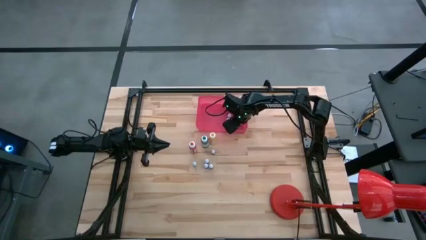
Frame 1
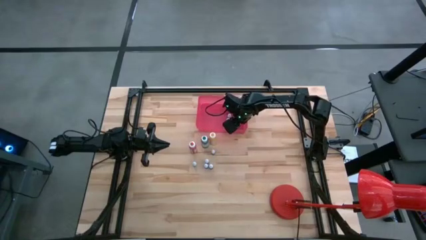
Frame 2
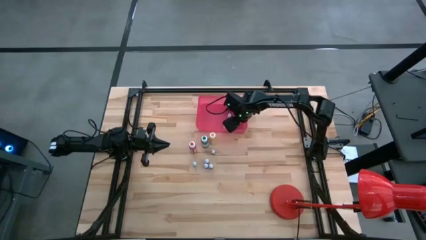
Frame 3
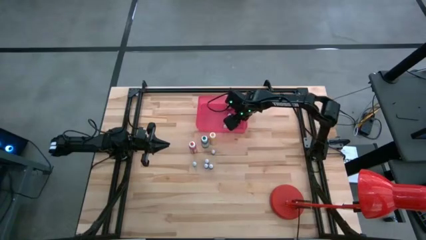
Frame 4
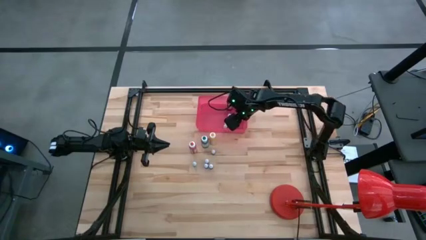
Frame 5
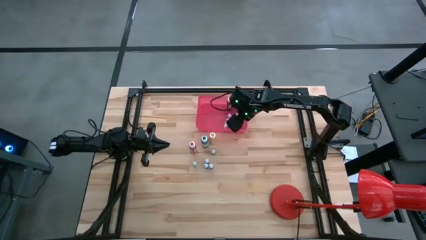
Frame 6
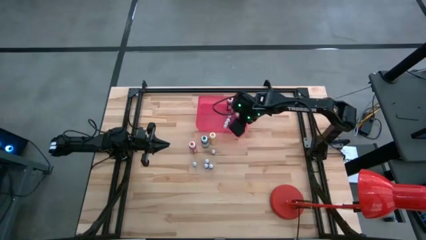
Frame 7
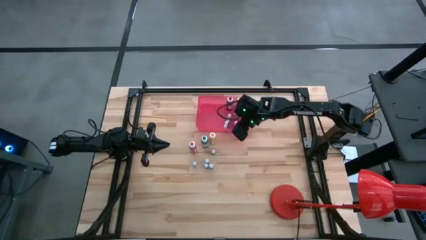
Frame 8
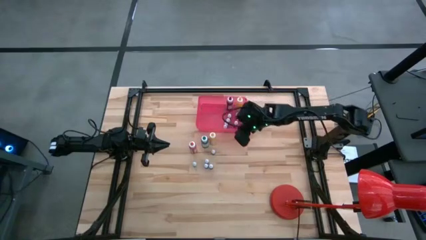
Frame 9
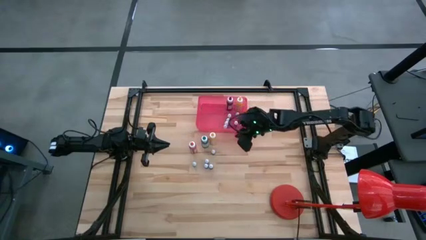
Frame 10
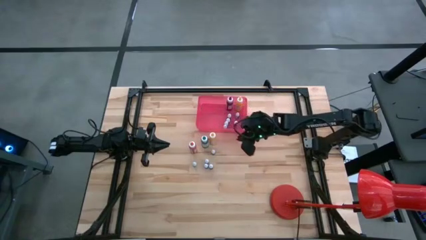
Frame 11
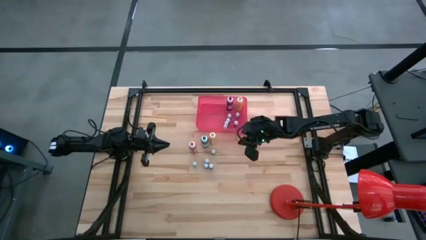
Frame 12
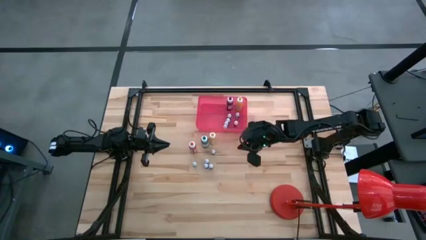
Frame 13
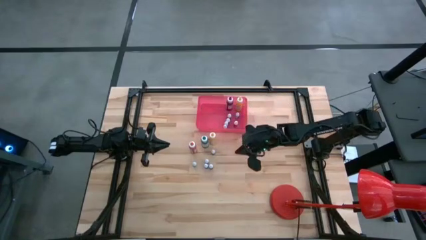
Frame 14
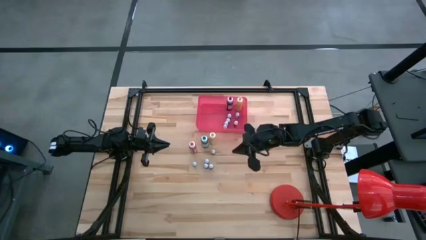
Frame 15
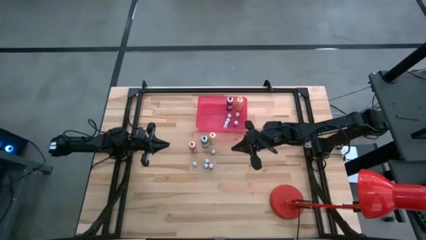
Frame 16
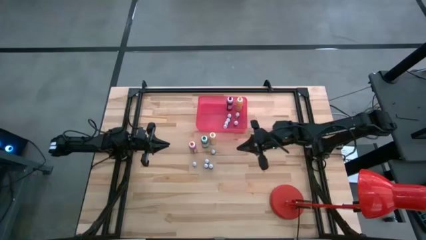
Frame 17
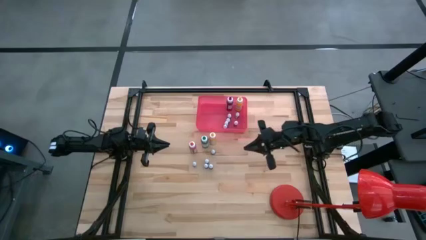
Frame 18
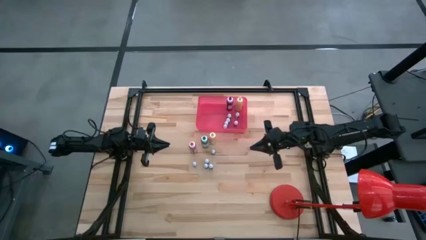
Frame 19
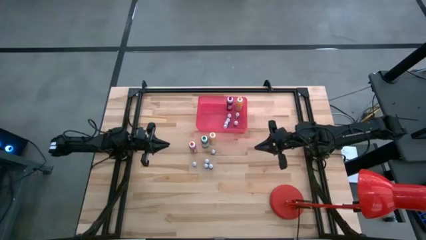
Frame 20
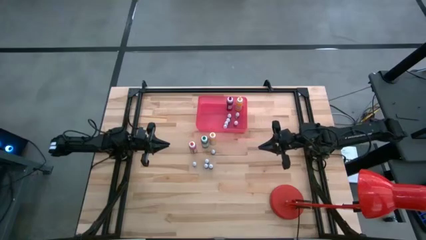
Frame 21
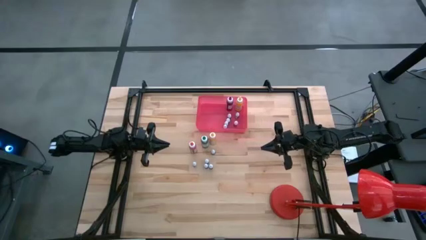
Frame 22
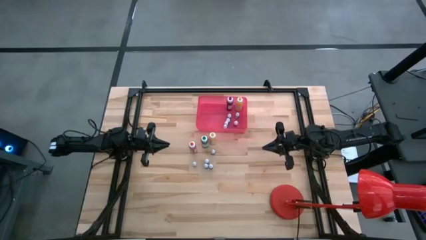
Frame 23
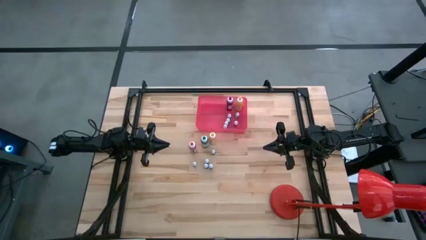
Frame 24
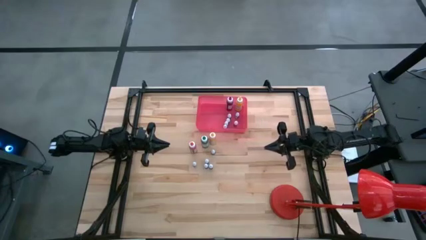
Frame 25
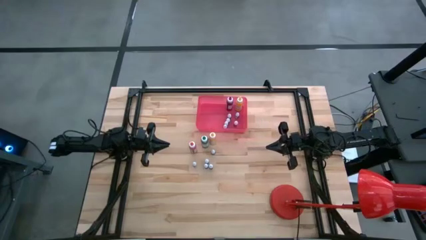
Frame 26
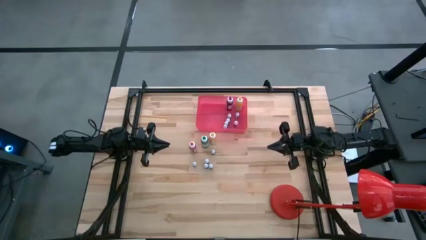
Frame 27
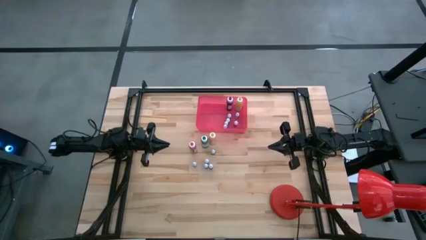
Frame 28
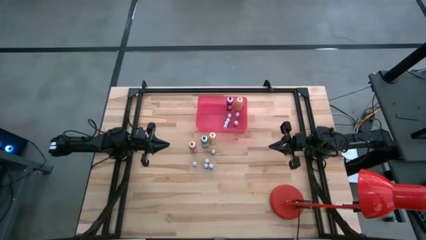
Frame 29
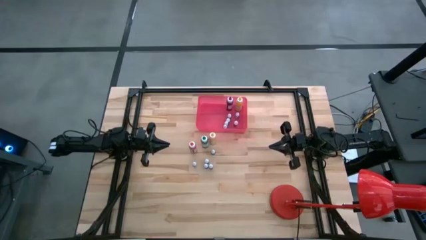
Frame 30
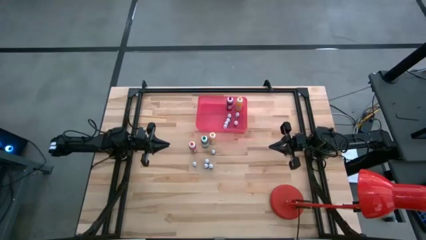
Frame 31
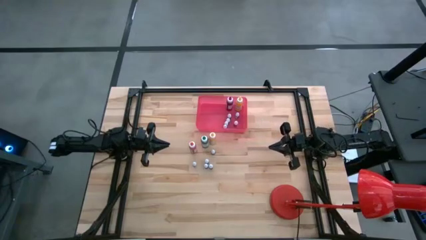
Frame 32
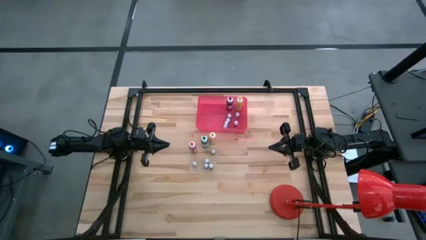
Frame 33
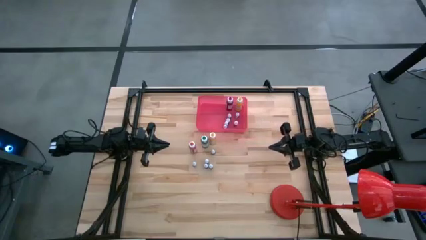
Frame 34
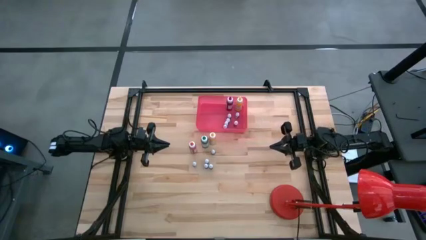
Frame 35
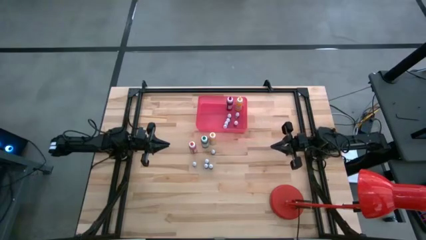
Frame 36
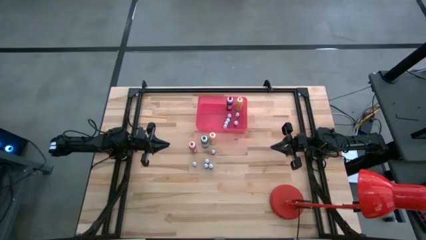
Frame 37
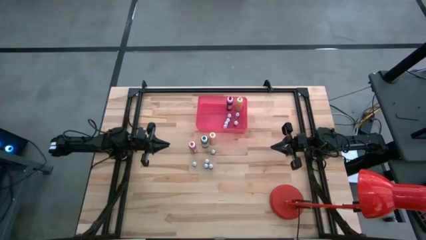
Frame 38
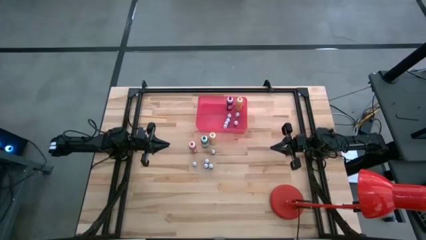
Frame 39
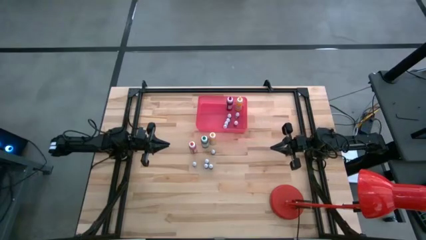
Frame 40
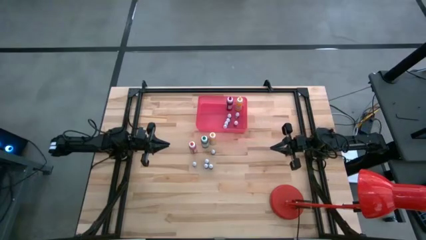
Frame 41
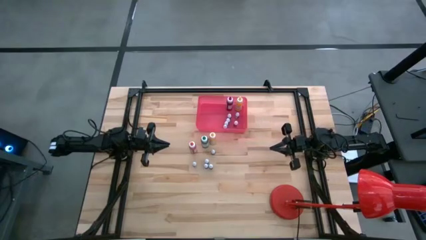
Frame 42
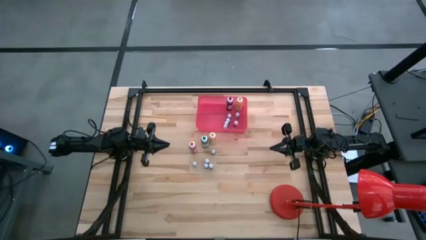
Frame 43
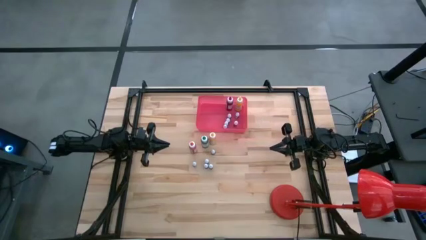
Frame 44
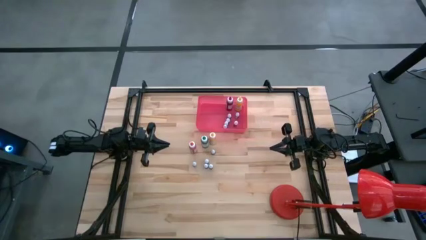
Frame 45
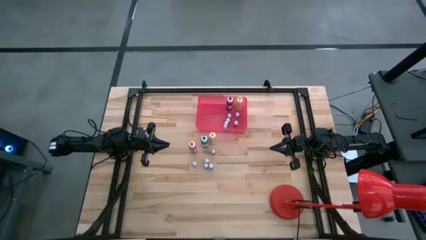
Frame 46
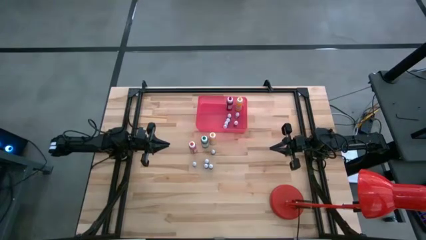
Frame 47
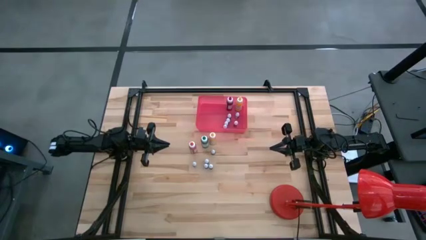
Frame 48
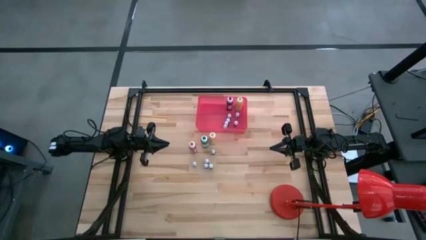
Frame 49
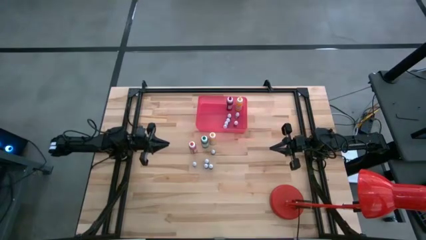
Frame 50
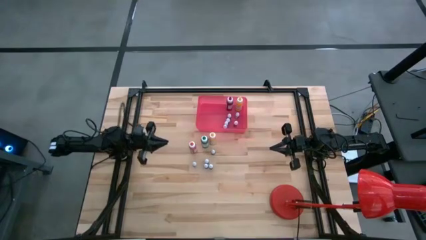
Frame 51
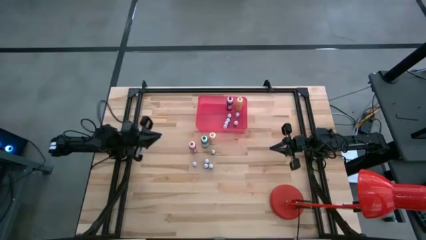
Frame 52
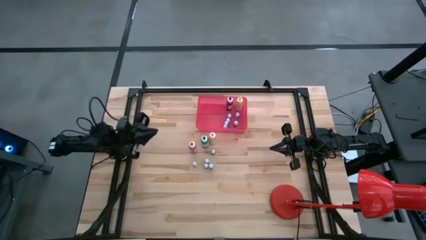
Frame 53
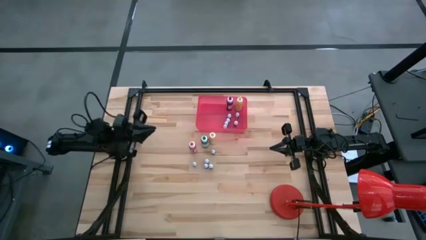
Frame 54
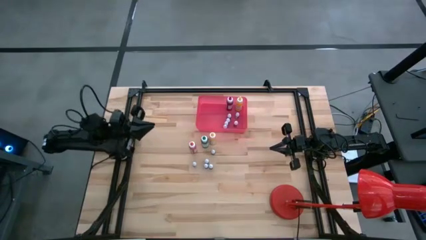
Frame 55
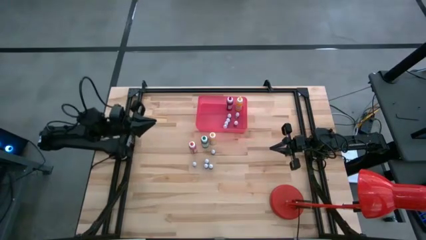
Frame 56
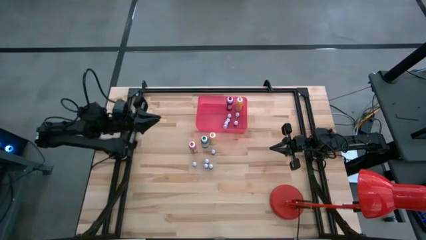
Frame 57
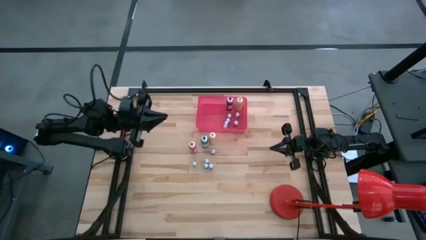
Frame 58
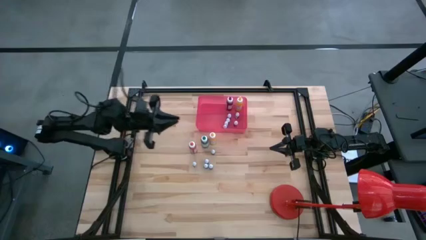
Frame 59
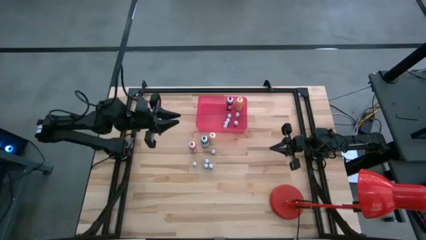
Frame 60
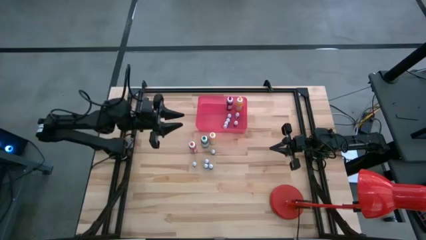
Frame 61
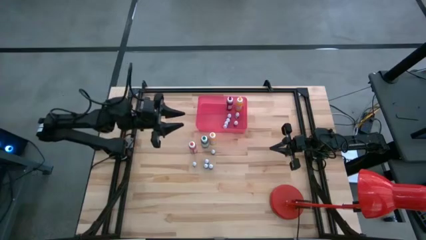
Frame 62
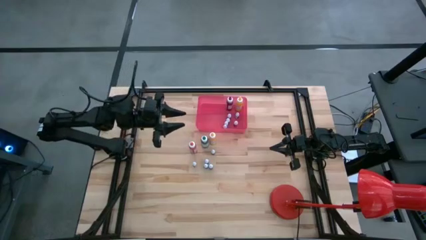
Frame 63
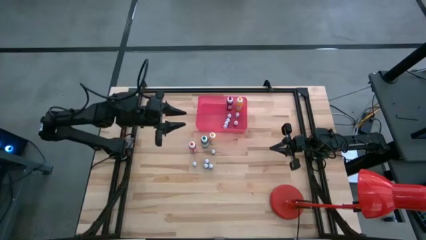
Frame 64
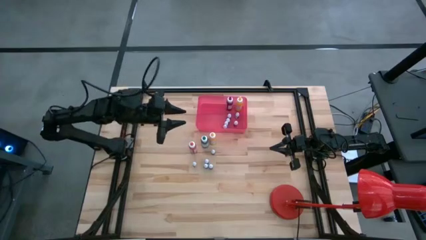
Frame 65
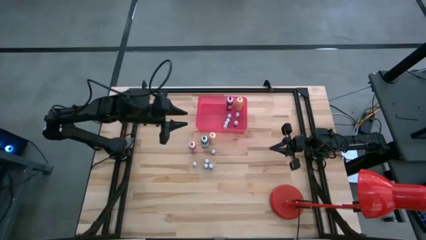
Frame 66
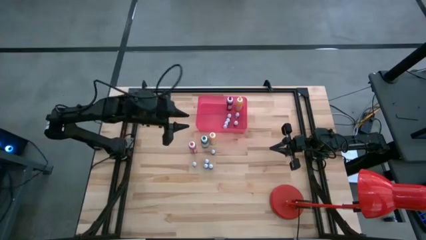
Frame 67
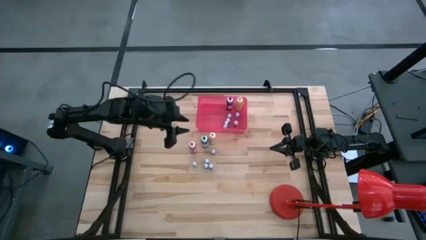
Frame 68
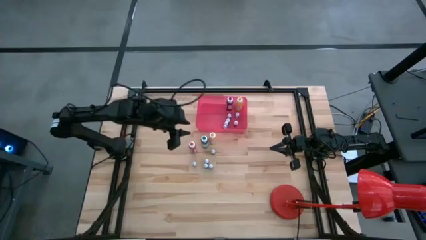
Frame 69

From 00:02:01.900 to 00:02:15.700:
Task: Pick & Place food coloring
Put the large orange food coloring bottle into the pink bin

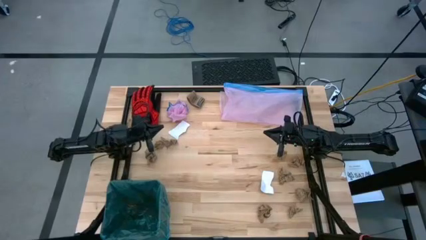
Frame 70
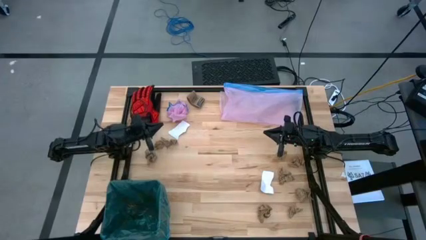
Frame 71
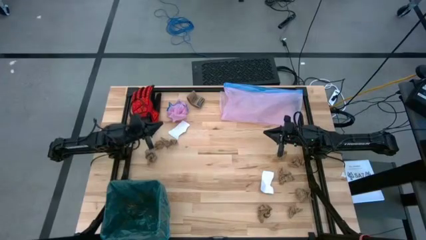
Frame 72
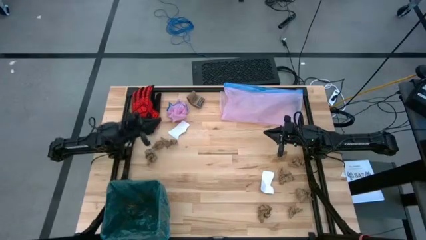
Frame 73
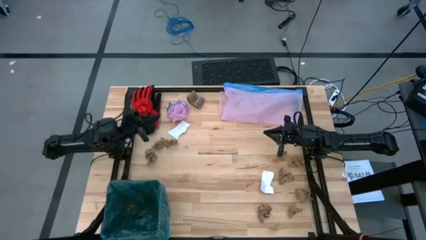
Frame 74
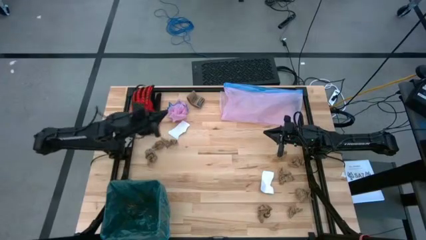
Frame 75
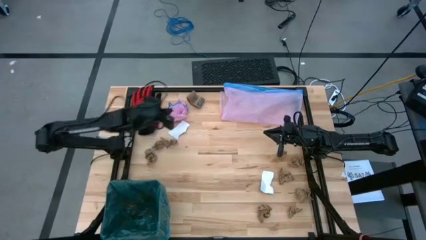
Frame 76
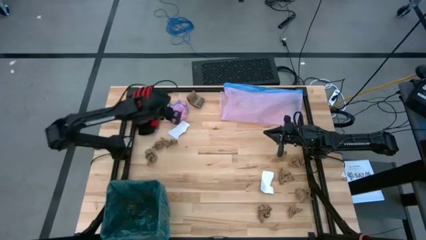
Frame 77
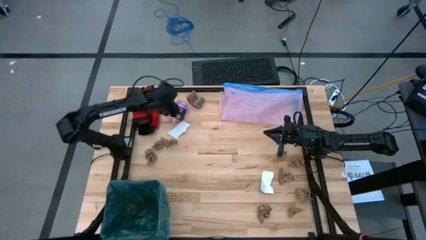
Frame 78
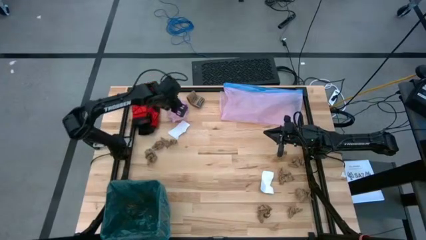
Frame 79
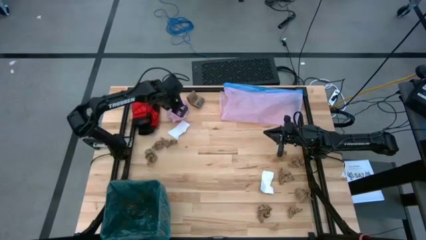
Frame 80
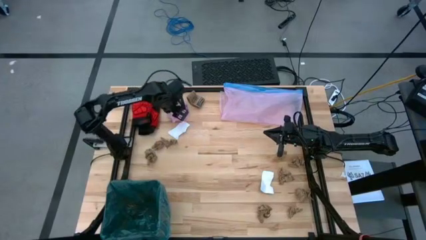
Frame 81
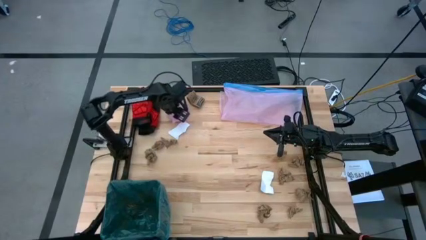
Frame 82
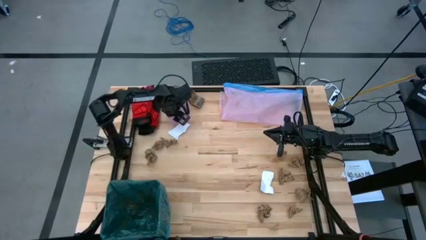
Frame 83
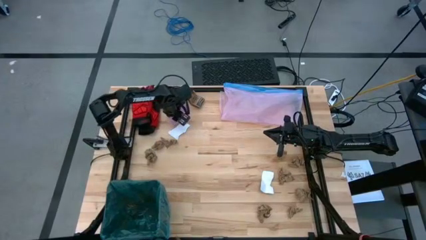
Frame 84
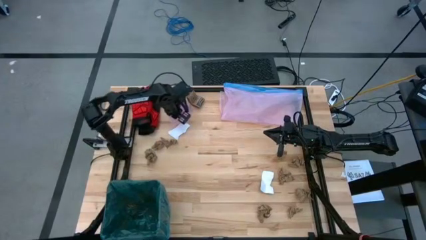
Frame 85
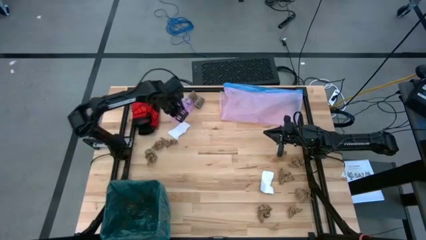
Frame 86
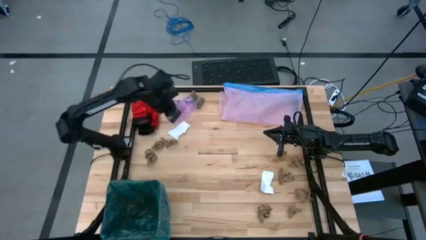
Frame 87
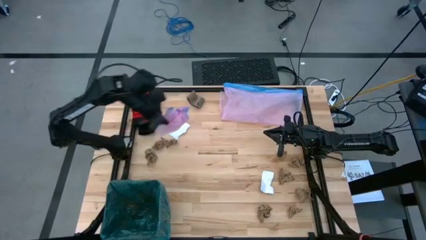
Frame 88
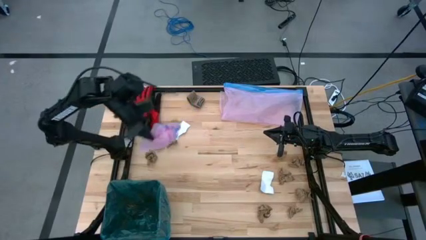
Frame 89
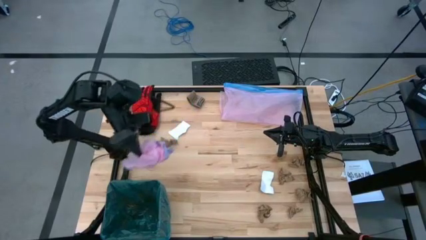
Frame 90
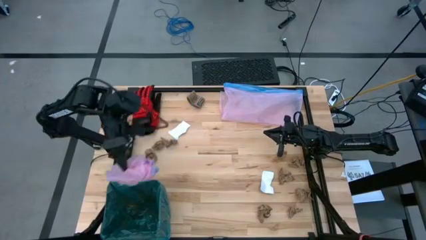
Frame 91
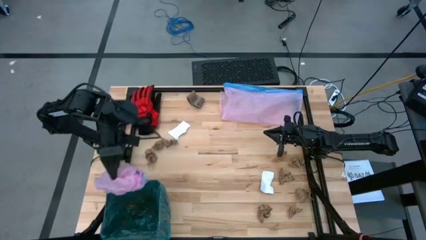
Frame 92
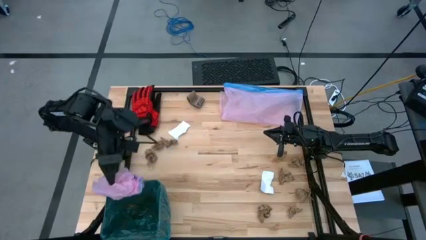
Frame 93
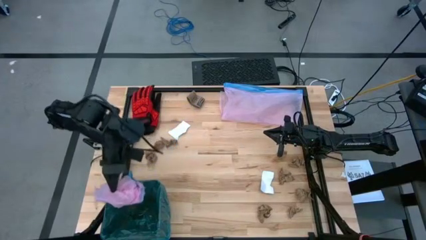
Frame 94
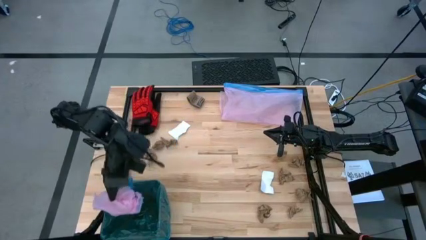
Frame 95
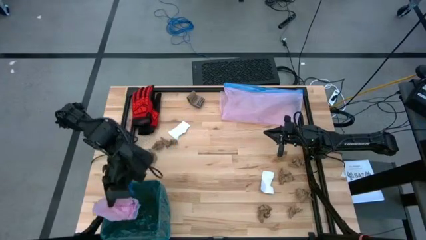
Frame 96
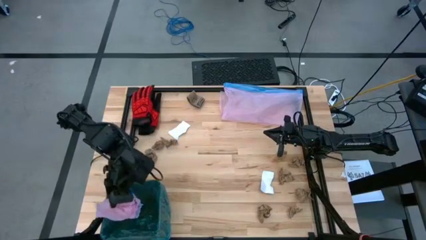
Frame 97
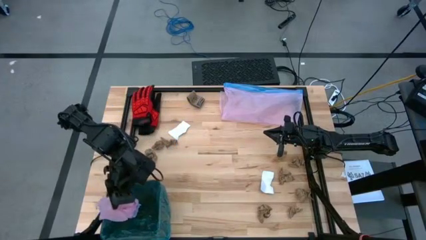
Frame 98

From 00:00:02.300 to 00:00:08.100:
Task: place trash/remove bag and relplace
Put the left pink trash bag into the black trash bin
